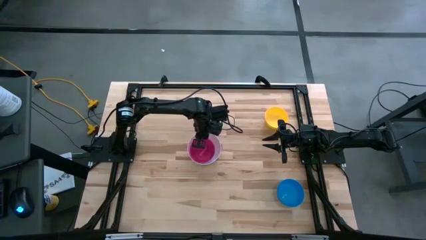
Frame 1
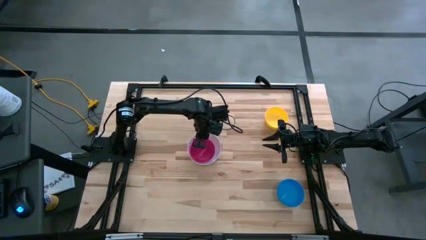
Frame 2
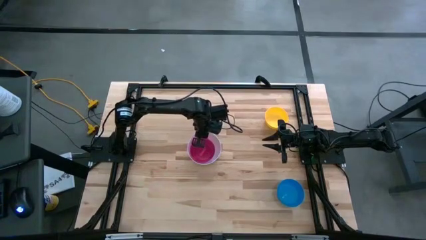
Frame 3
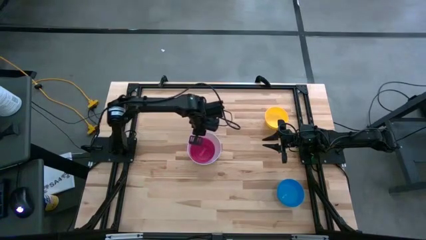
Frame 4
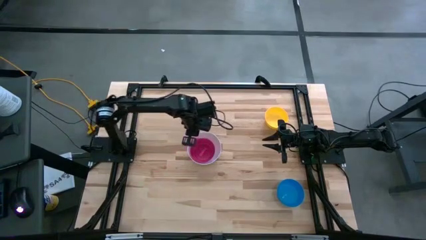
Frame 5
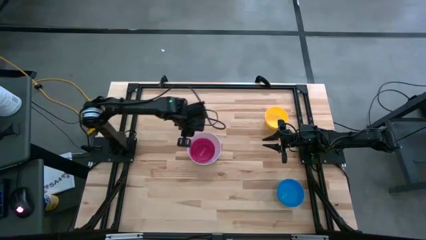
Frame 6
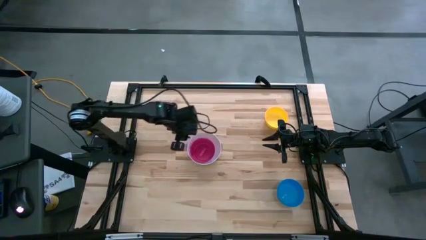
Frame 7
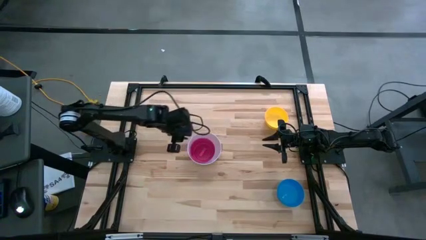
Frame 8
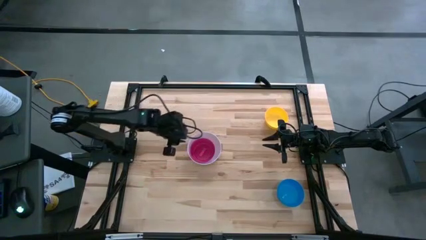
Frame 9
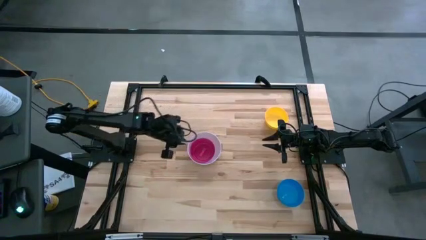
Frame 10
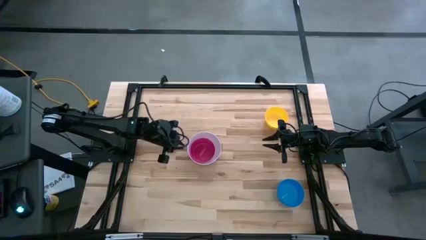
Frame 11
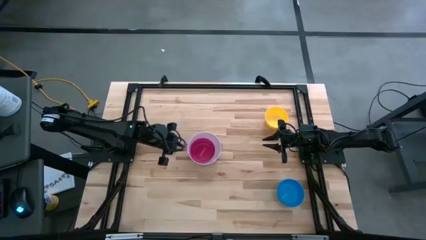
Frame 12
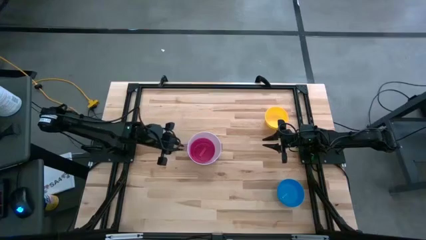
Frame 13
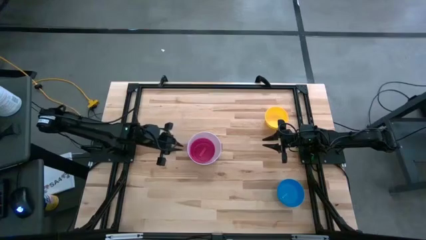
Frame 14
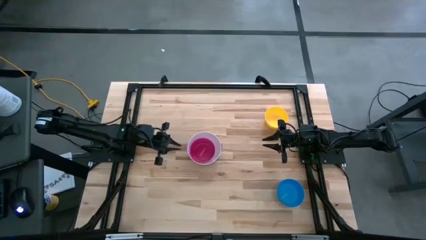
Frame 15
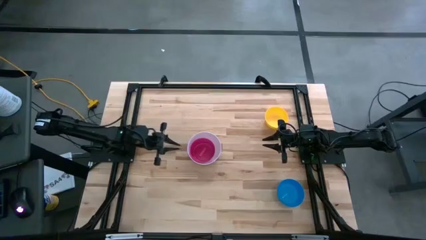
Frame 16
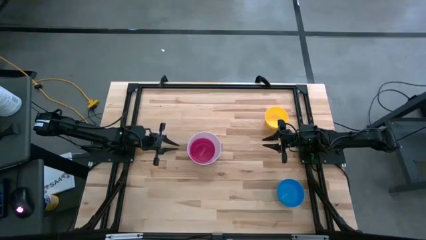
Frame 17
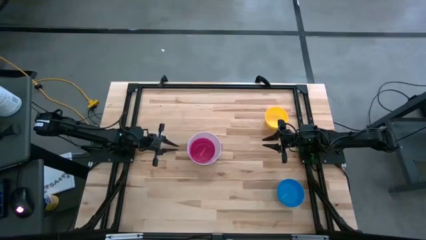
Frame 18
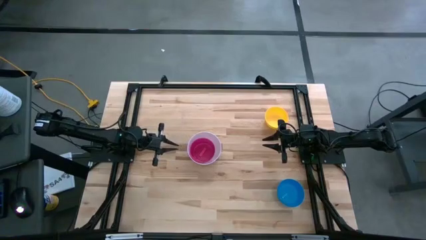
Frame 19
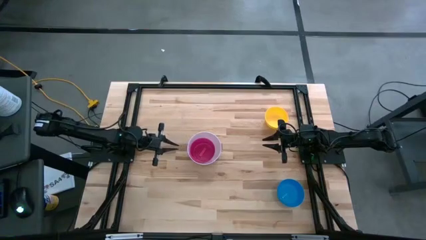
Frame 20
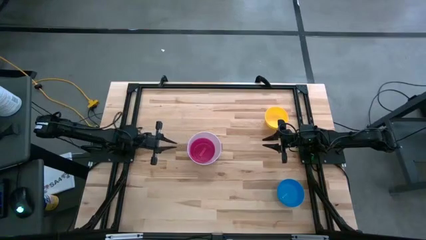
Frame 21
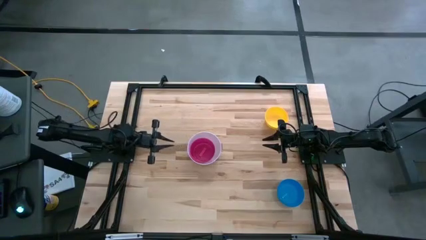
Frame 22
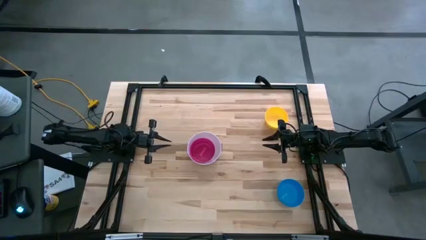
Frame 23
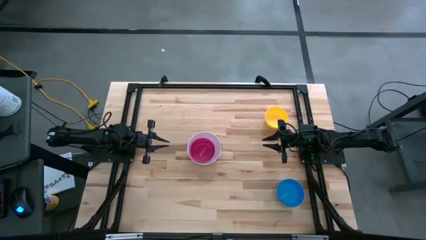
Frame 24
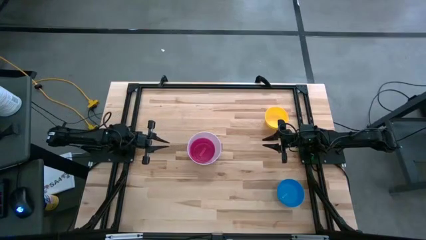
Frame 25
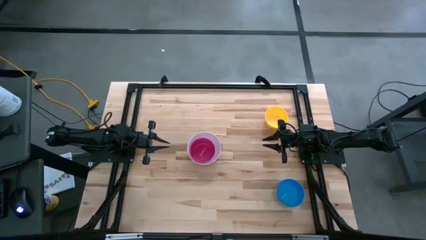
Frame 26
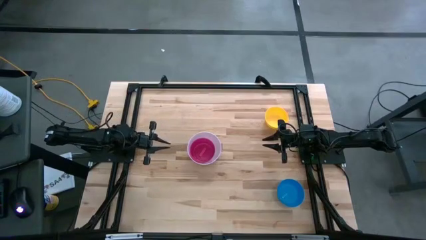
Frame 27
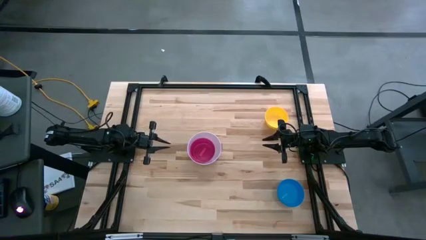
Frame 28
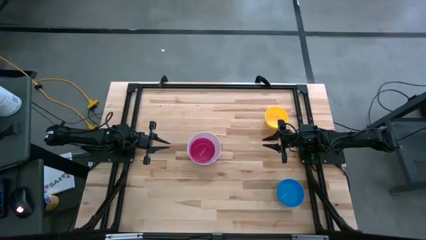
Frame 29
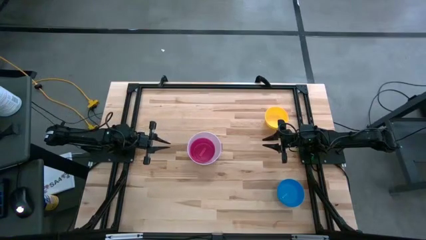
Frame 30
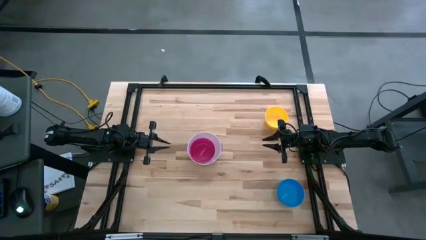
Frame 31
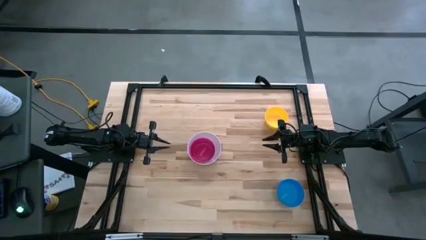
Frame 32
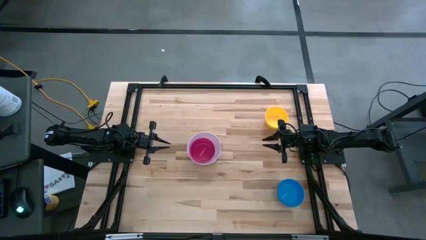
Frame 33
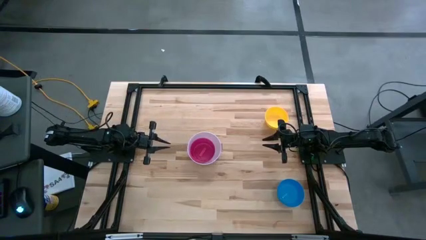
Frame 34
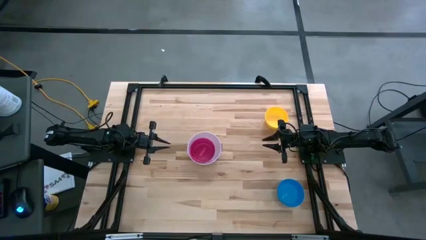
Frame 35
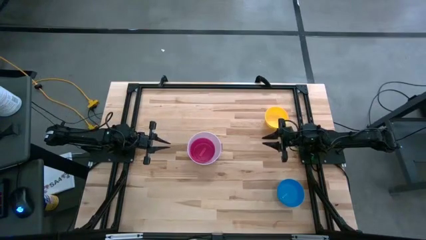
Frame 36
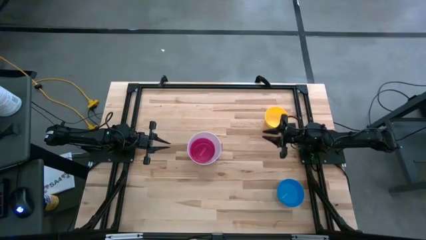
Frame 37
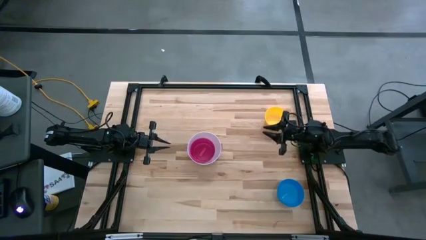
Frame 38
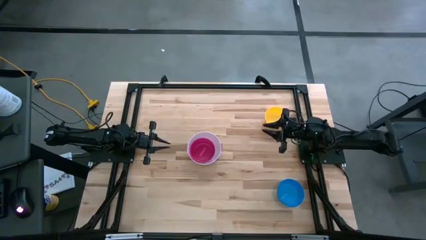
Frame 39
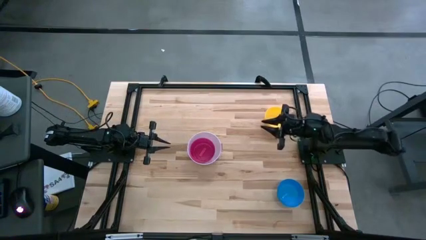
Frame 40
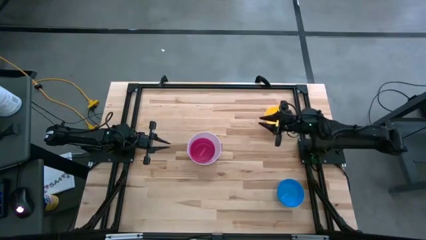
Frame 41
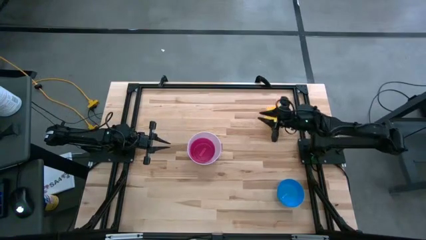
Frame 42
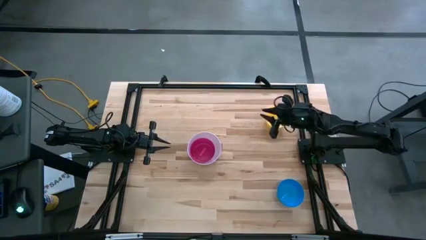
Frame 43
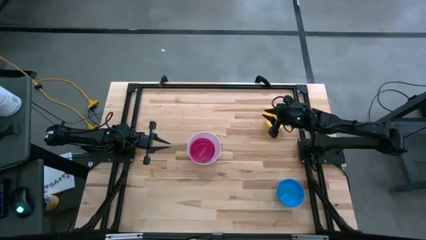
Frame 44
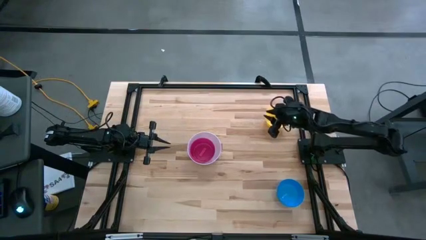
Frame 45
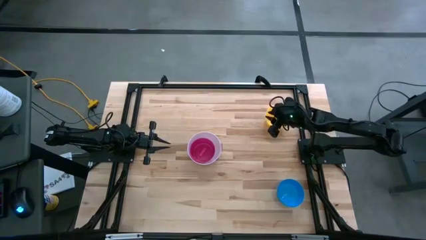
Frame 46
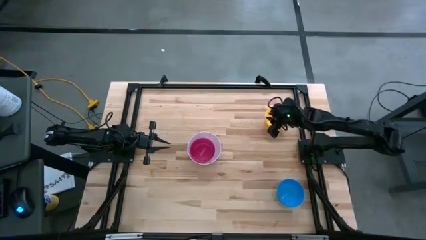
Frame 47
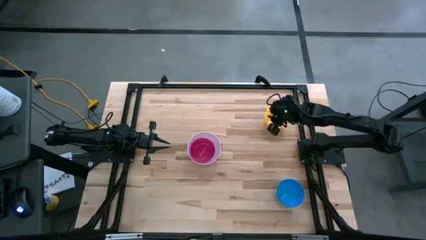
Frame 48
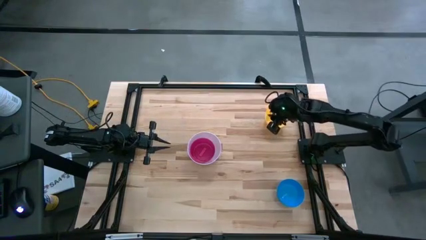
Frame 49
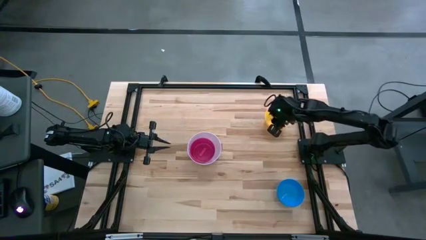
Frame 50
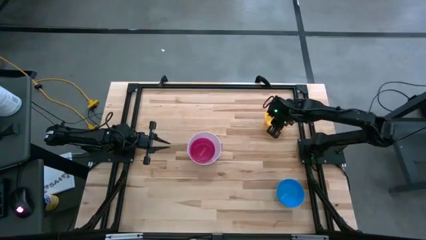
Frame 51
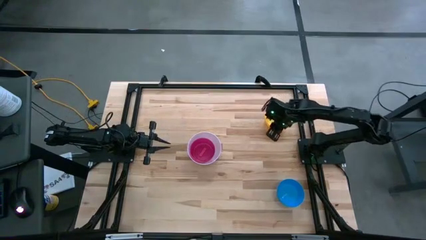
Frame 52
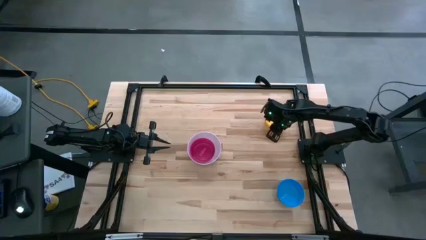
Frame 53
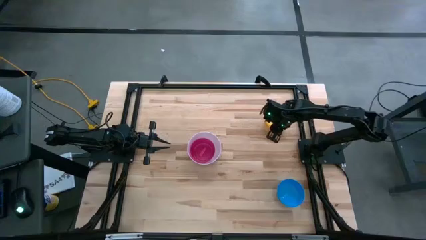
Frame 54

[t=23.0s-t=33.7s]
Stack the yellow bowl on the red bowl

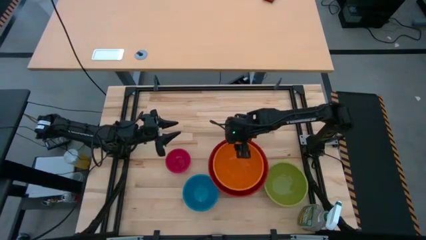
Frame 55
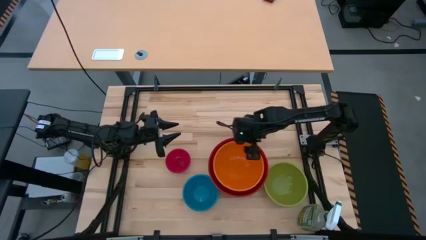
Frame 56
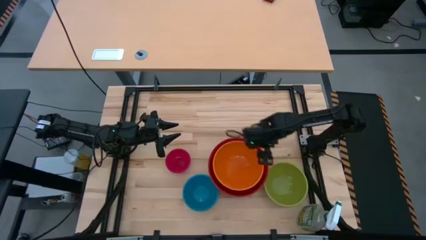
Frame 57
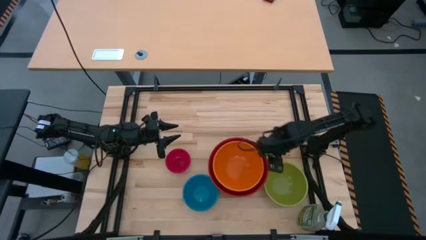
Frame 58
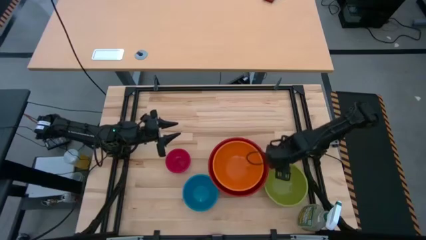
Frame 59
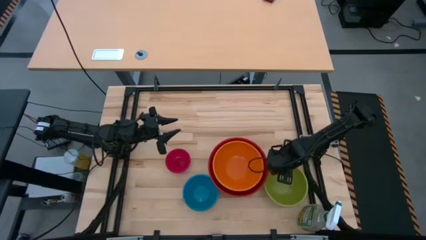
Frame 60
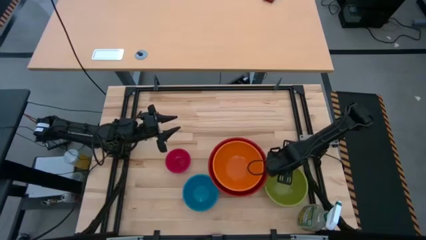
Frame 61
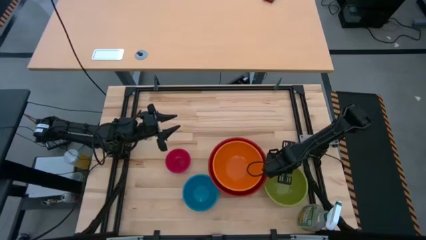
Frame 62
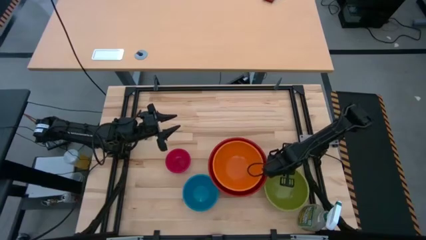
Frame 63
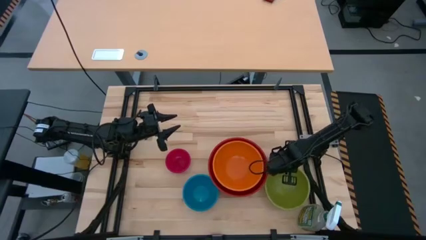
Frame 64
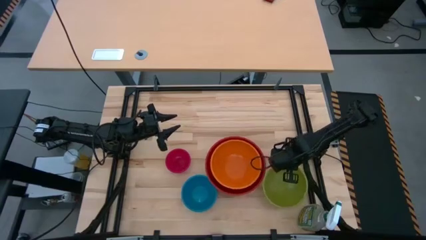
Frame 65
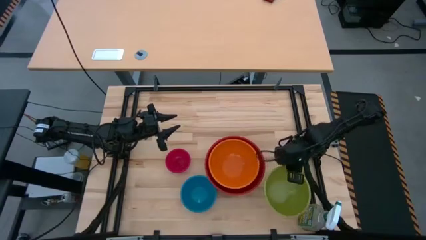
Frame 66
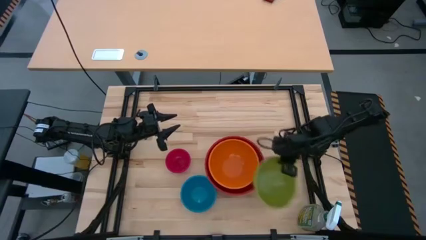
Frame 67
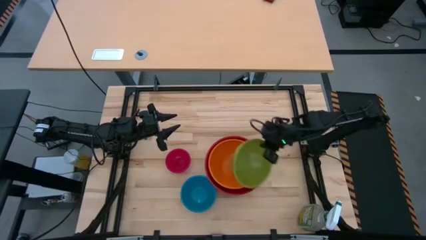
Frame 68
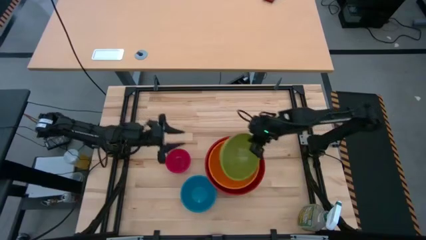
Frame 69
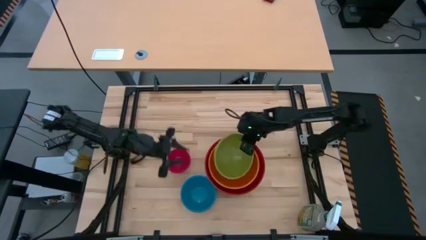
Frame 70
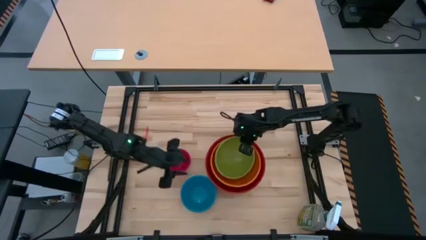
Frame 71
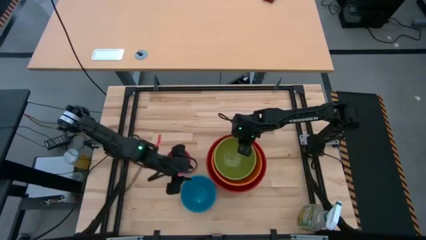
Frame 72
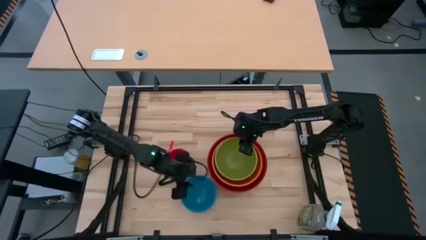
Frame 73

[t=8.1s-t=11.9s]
Stack the green bowl on top of the orange bowl

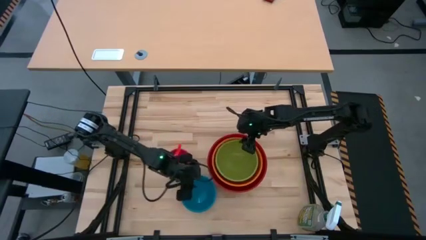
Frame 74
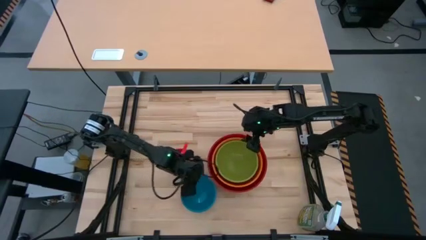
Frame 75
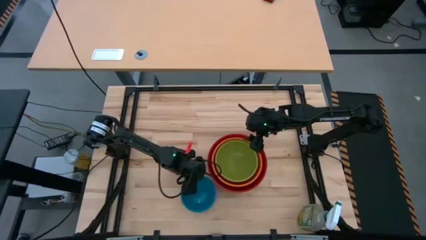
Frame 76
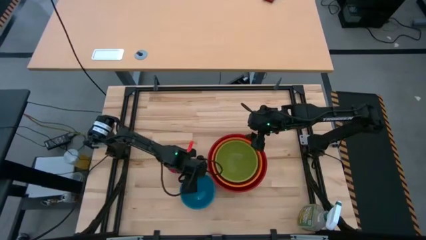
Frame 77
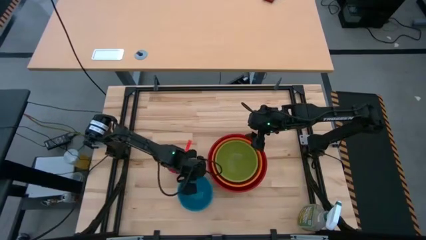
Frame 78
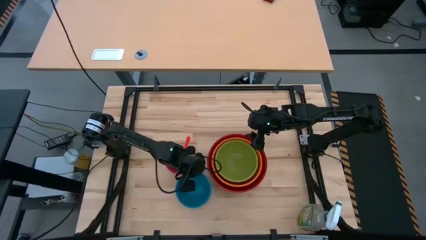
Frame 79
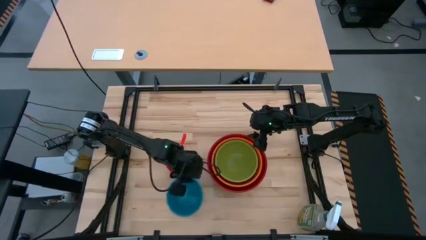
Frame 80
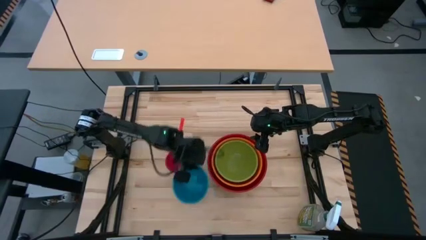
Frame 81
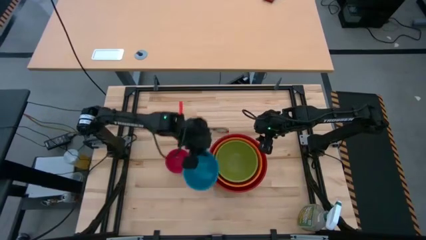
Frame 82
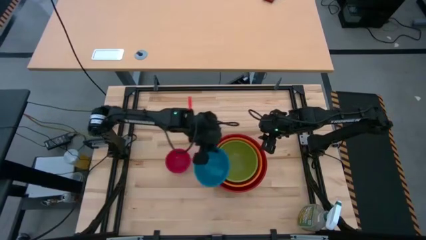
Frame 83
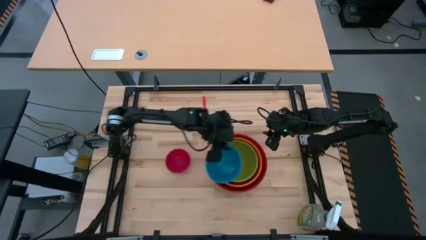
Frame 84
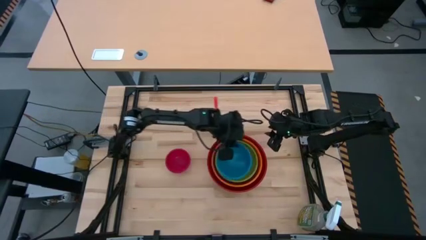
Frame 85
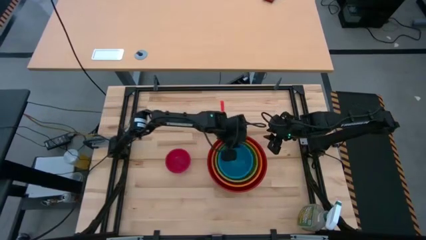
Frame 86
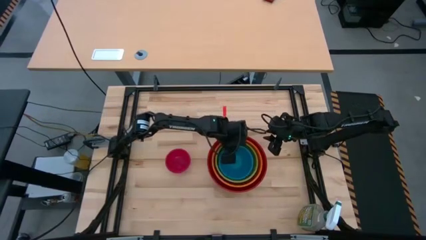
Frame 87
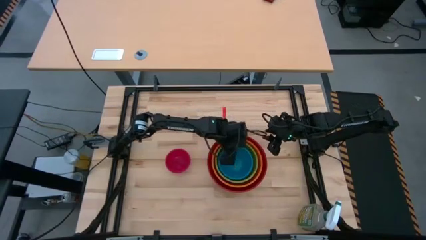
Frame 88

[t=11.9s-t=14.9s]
Stack the blue bowl on top of the green bowl
